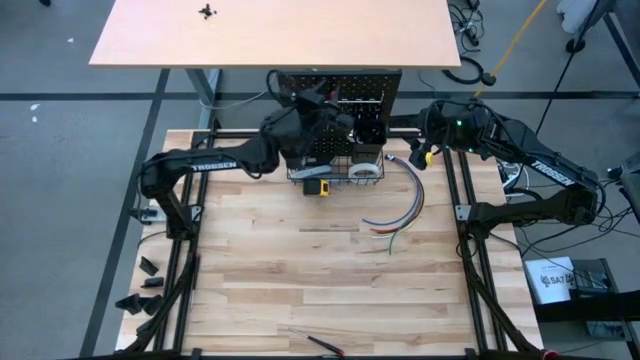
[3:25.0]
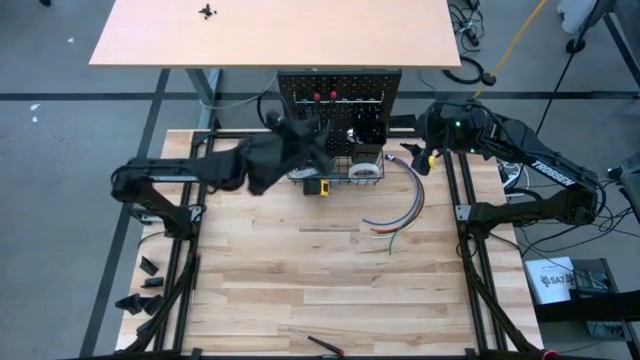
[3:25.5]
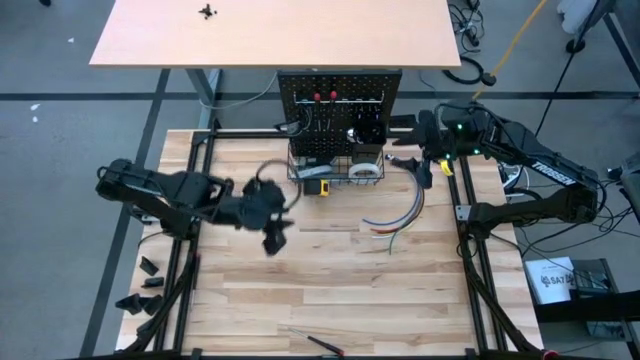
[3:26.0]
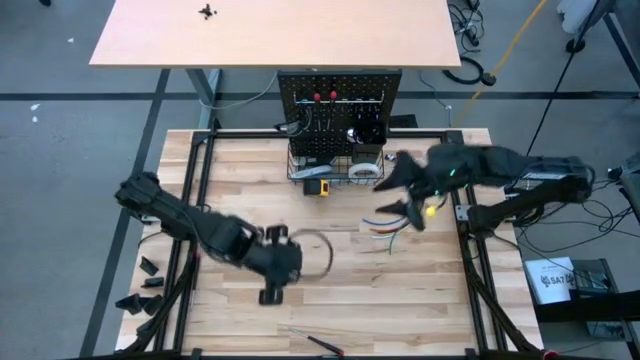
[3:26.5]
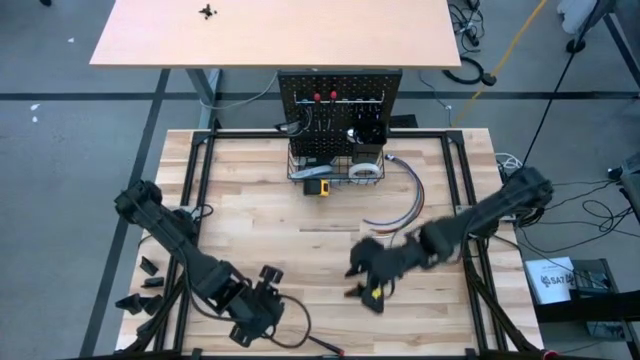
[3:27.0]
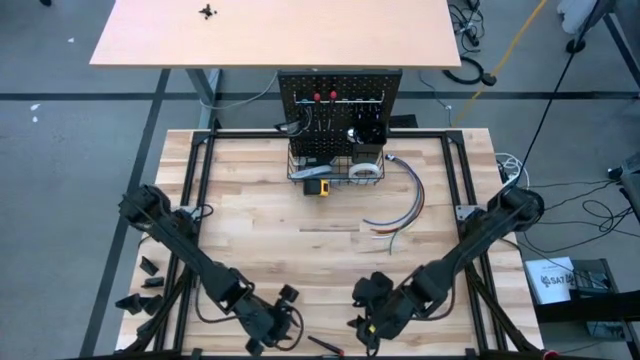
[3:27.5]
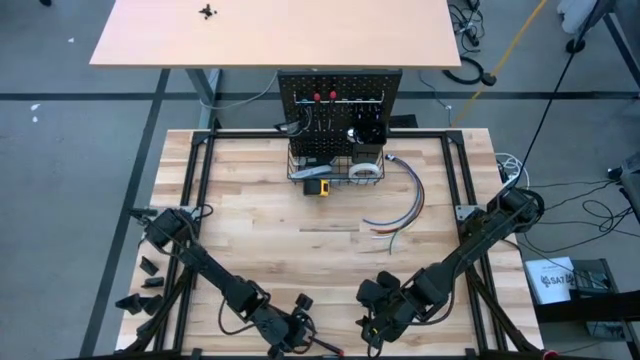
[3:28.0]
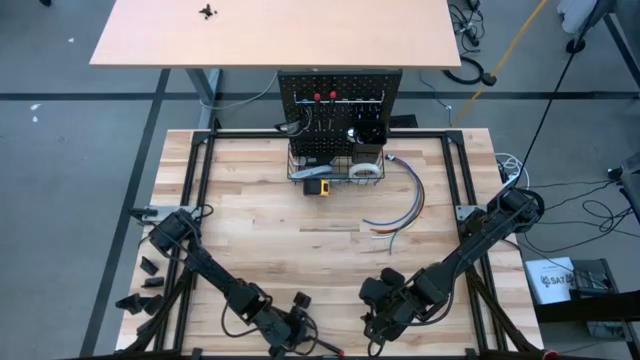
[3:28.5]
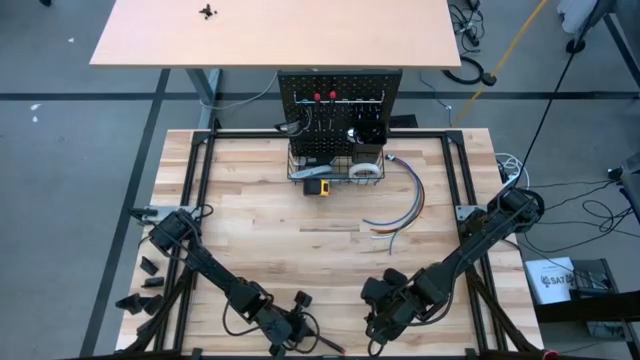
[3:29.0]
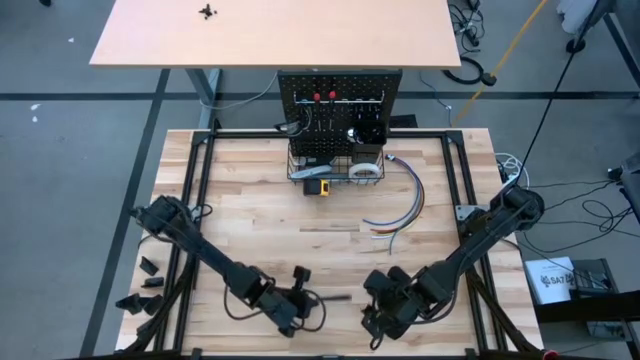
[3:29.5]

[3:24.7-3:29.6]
Task: Hang tools onto peg board
Hang the screwdriver on the pegboard

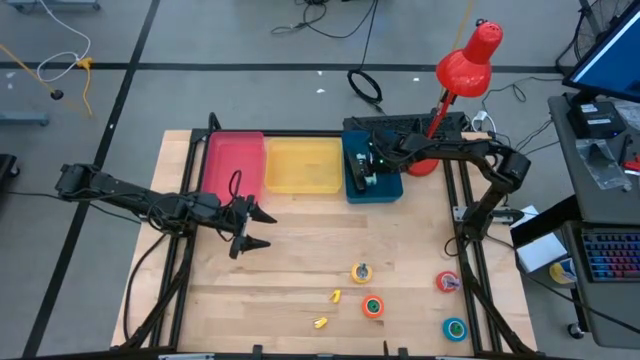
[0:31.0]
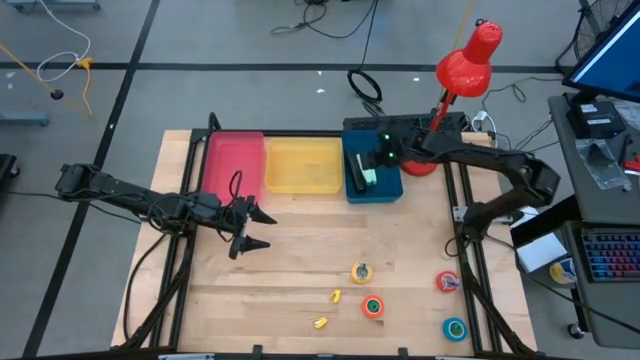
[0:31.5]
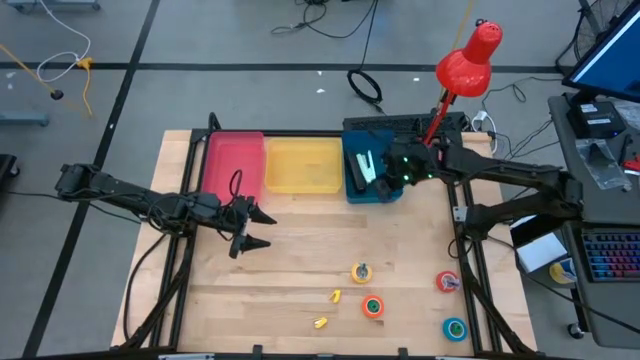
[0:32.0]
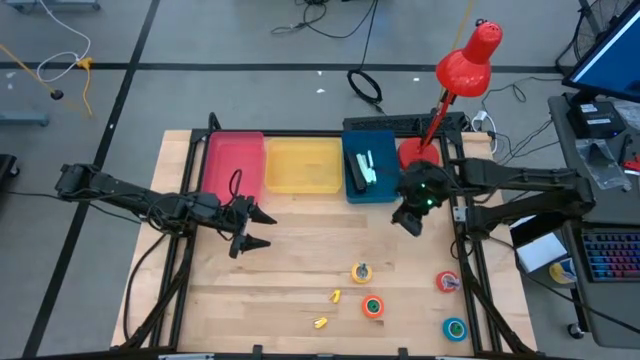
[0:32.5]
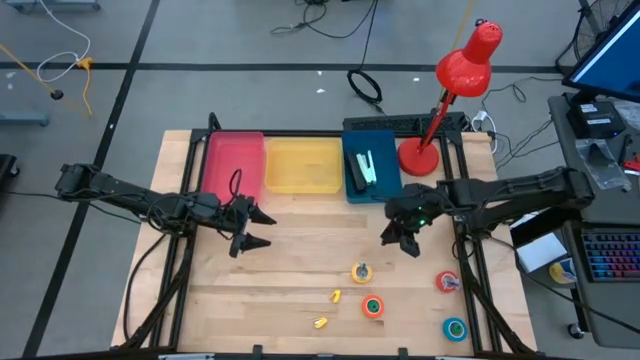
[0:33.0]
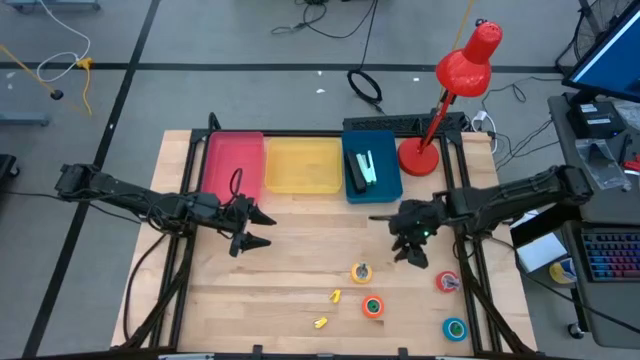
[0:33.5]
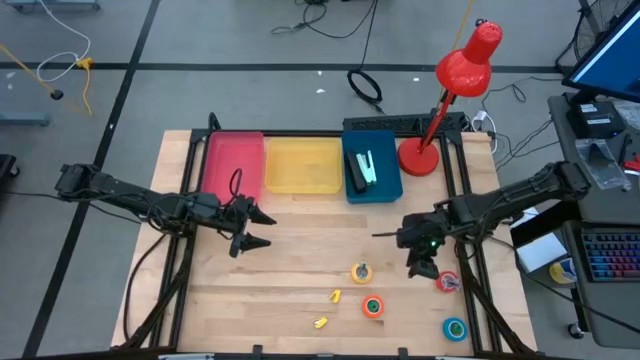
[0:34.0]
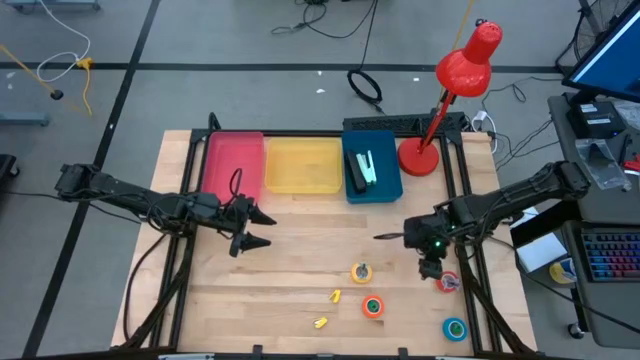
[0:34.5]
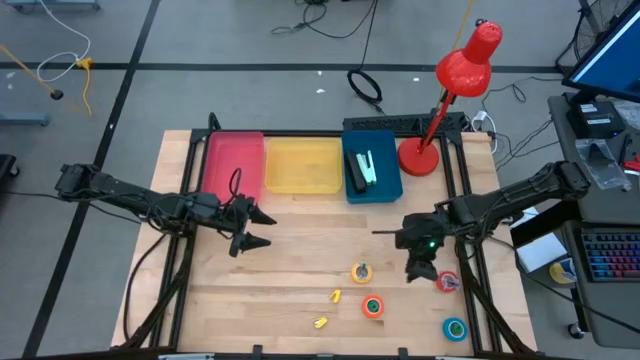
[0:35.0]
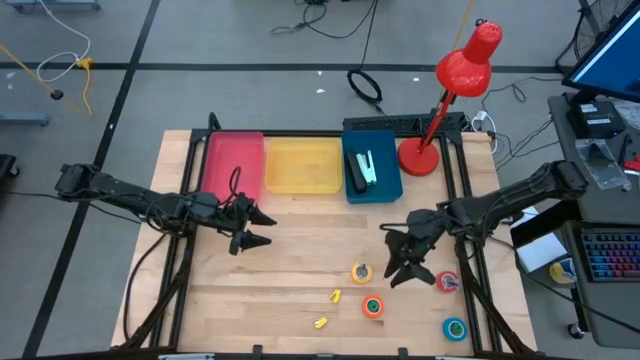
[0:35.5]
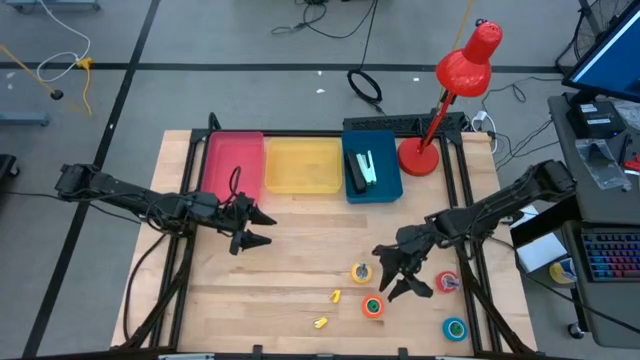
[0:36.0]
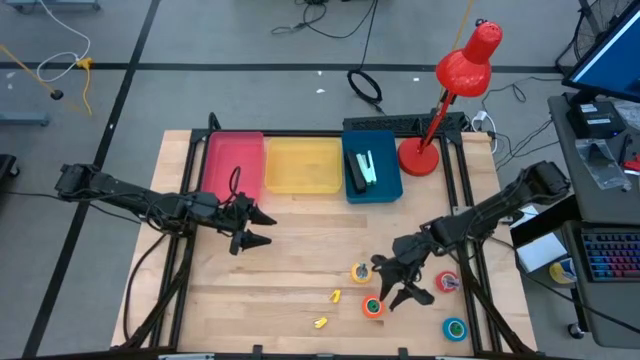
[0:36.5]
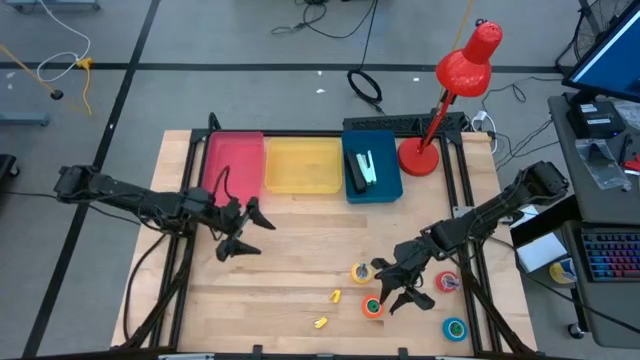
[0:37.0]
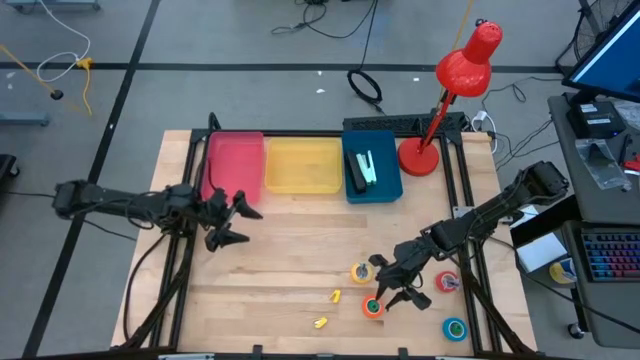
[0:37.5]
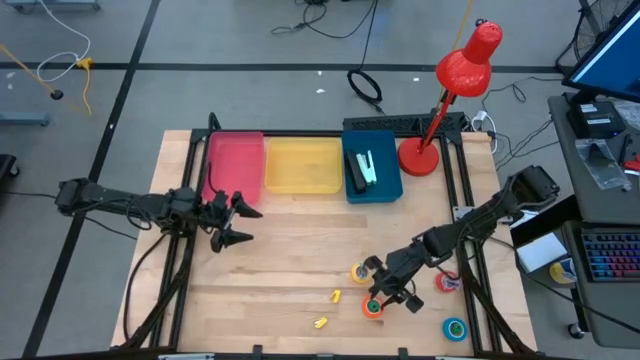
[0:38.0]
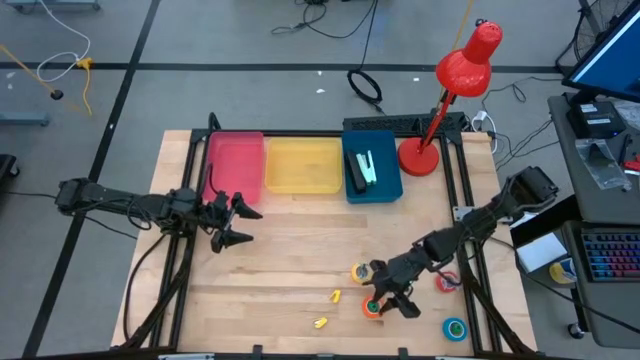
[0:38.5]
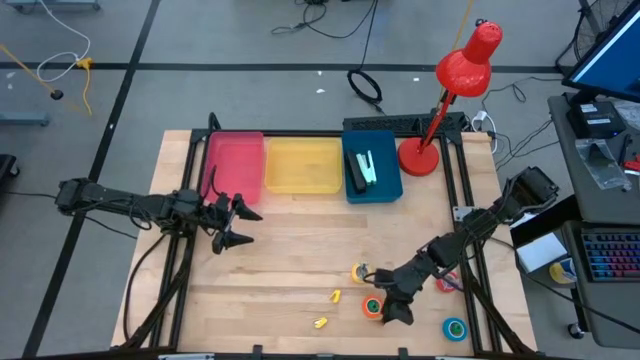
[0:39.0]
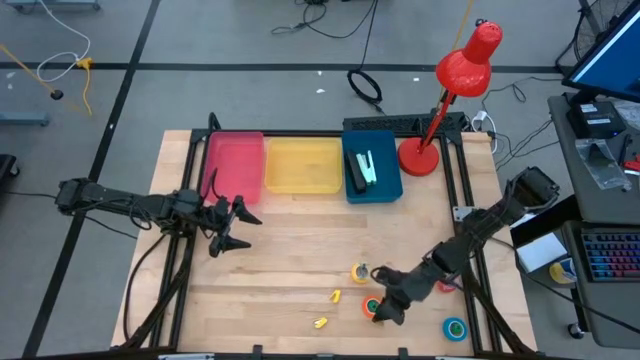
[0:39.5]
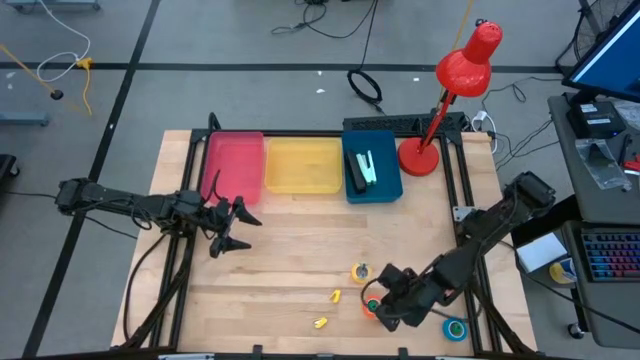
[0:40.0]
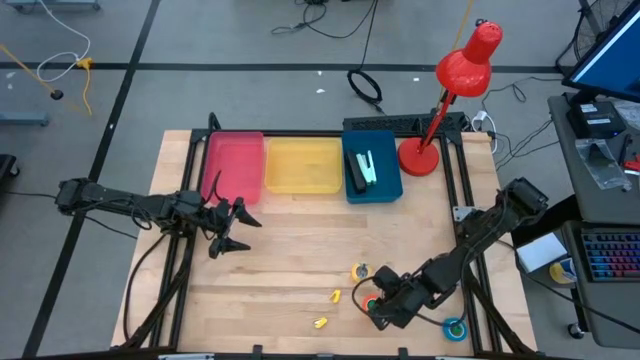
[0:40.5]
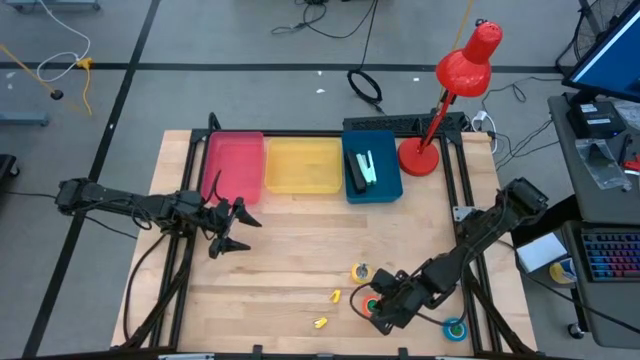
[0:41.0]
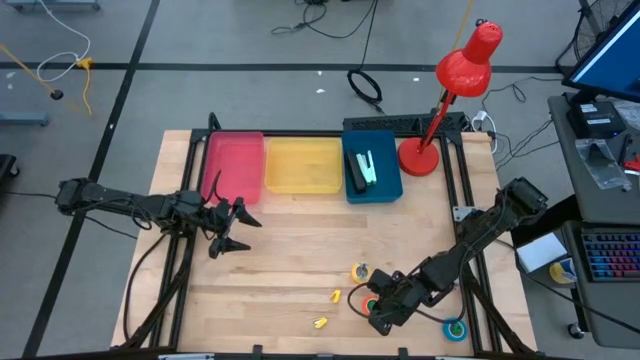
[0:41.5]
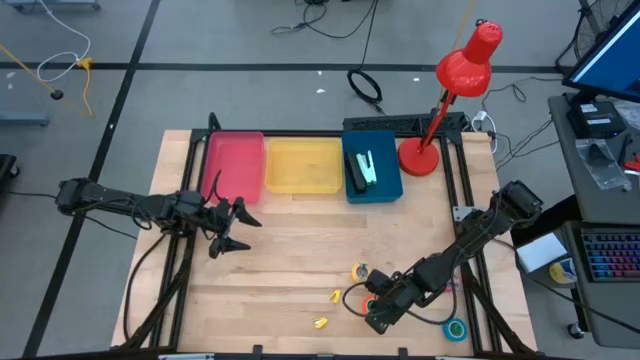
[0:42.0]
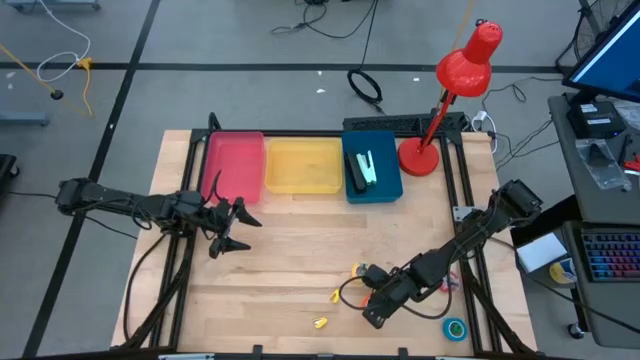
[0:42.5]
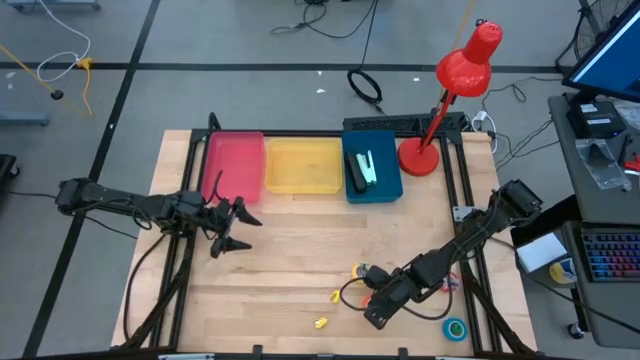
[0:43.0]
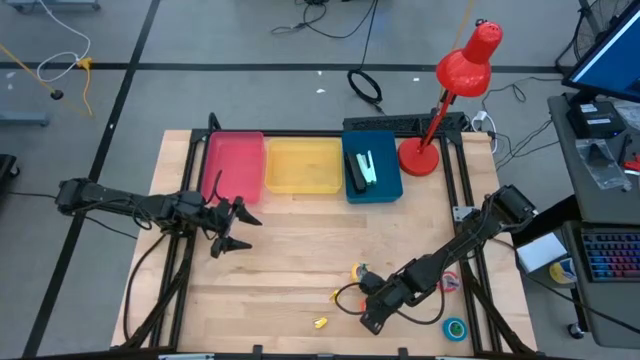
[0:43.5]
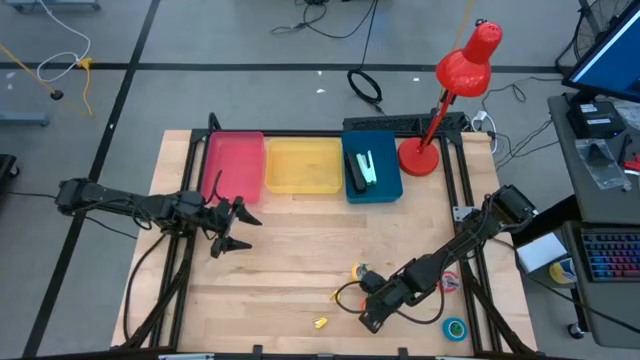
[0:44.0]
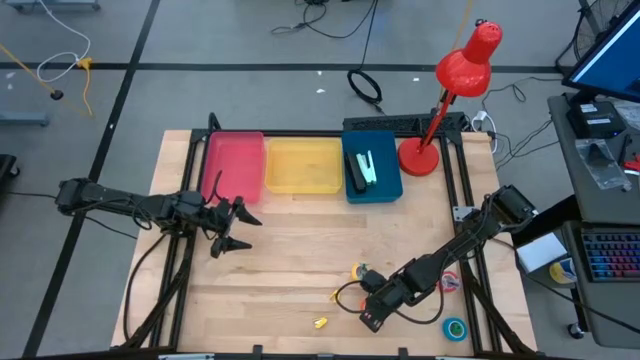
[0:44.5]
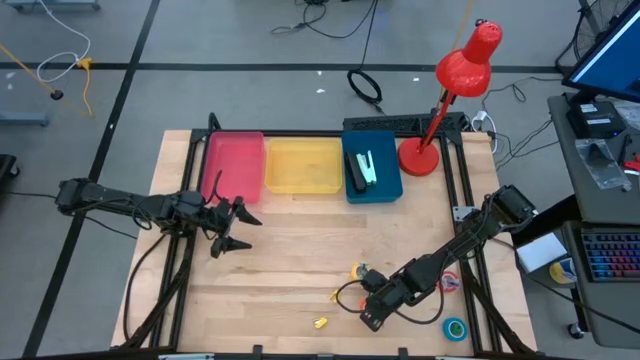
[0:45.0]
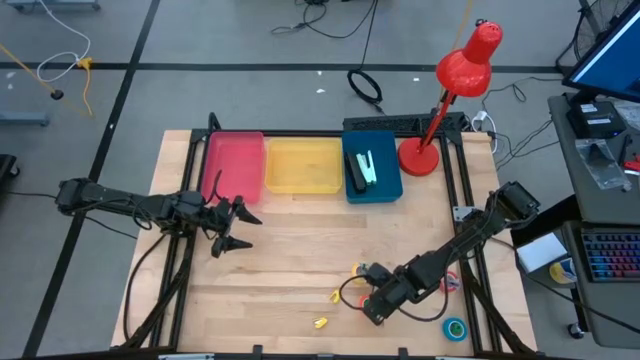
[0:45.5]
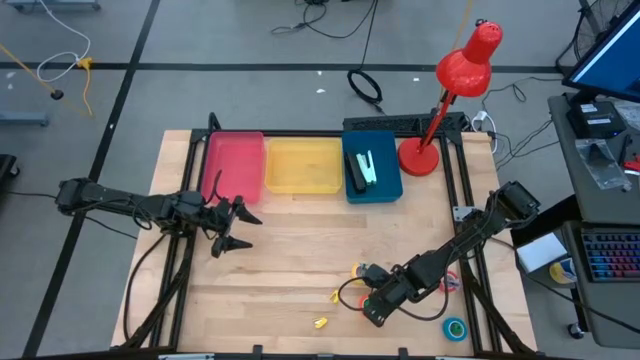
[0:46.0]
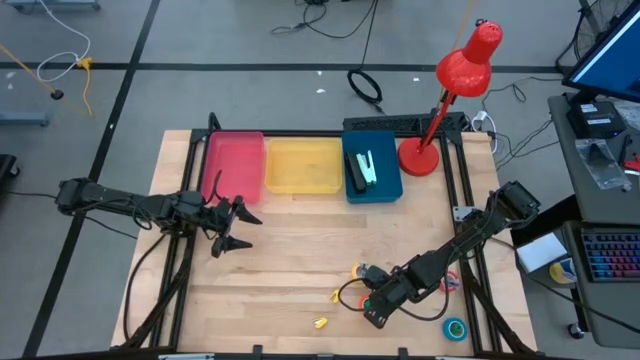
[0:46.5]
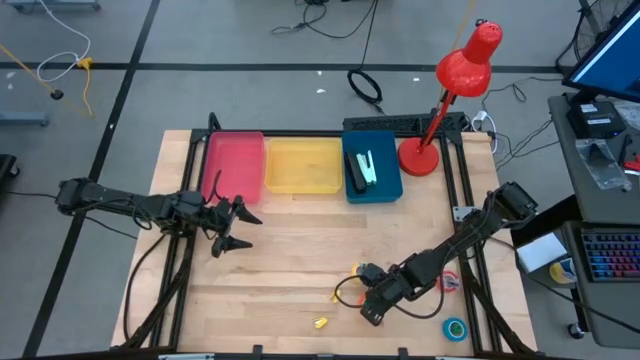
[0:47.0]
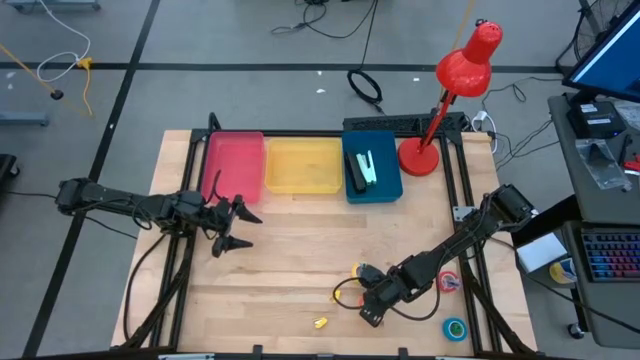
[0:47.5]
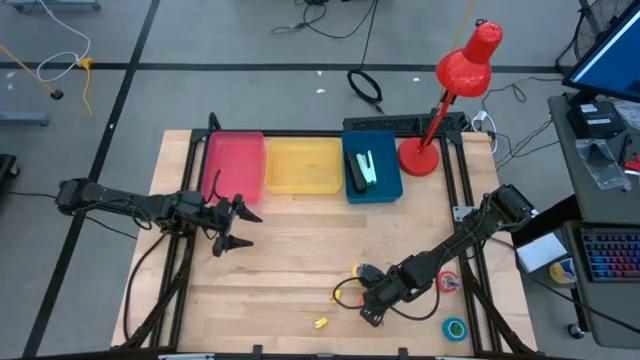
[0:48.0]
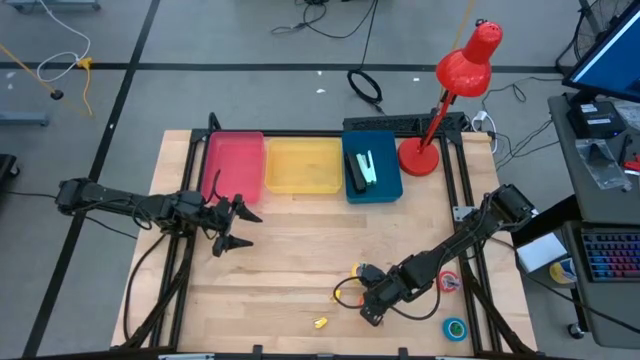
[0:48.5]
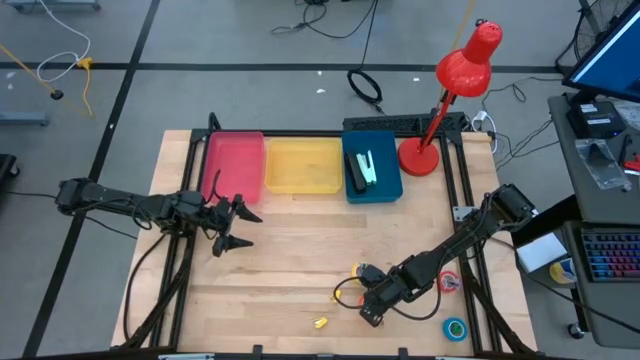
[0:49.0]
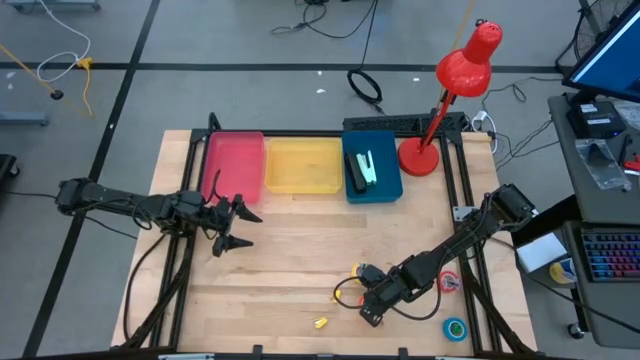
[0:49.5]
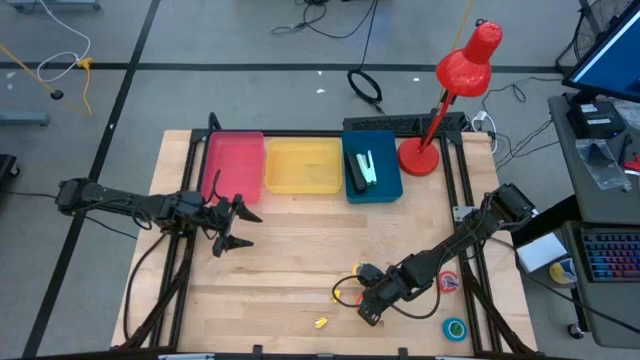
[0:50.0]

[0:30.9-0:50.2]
Task: Pick and place Stapler, Stapler remover, tape
Put the left green small stapler into the blue bin
